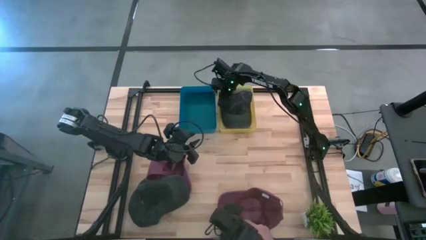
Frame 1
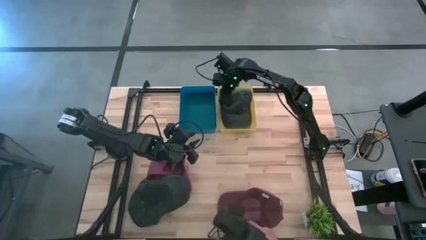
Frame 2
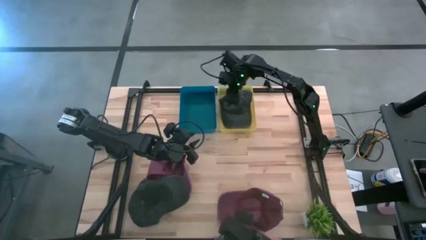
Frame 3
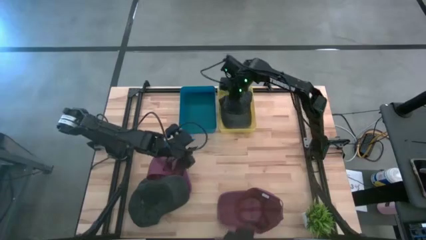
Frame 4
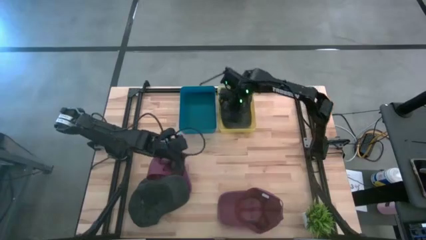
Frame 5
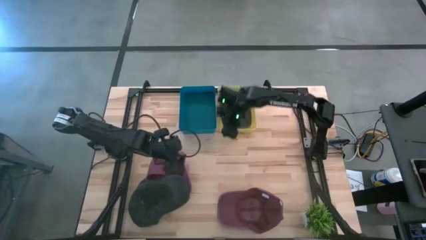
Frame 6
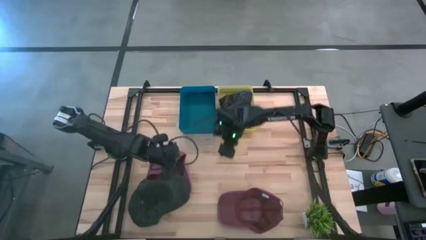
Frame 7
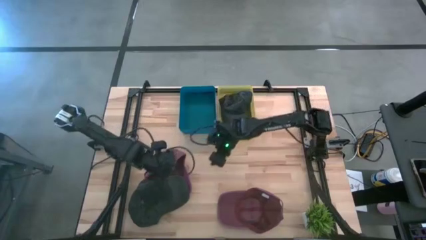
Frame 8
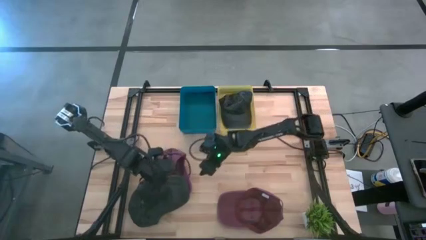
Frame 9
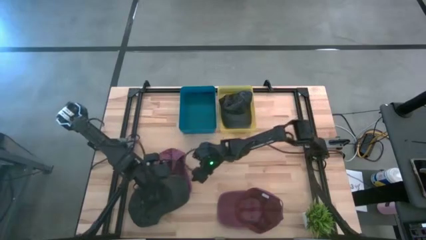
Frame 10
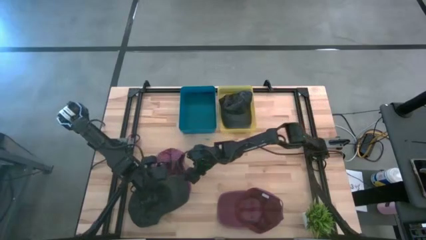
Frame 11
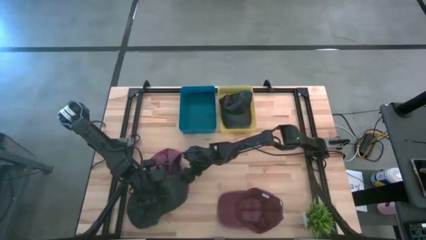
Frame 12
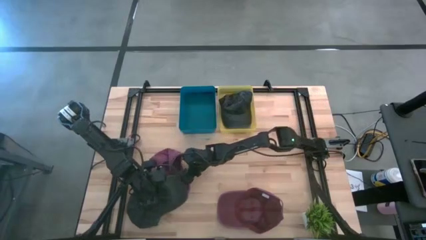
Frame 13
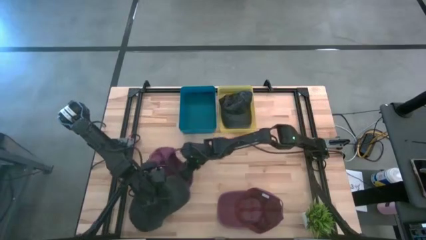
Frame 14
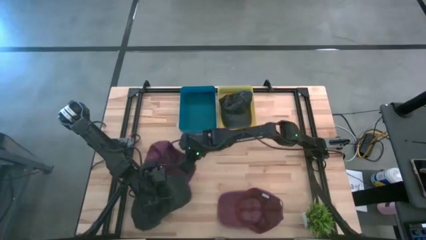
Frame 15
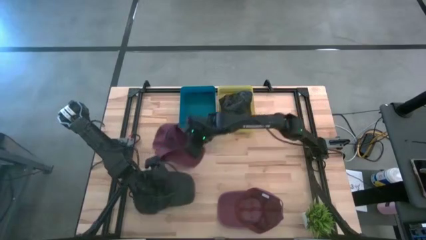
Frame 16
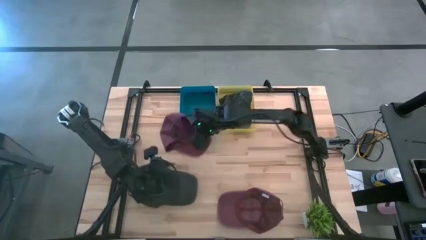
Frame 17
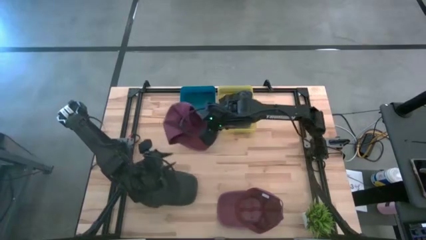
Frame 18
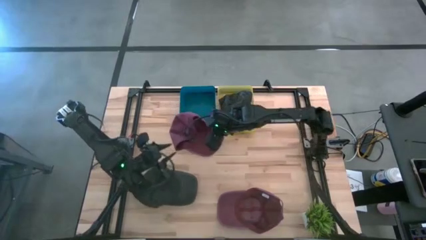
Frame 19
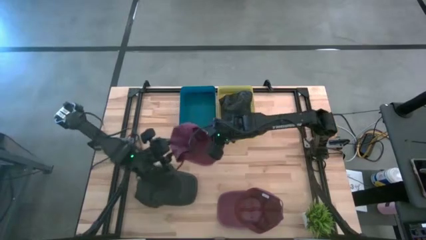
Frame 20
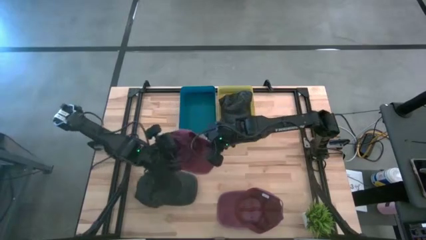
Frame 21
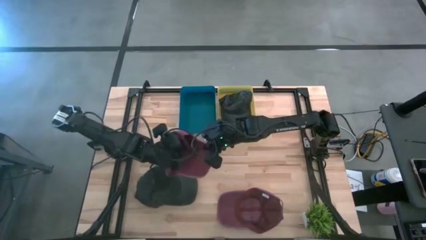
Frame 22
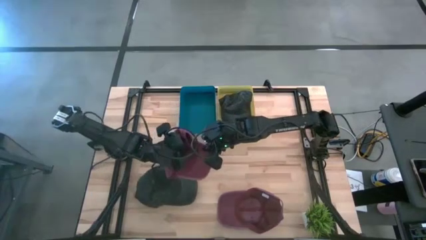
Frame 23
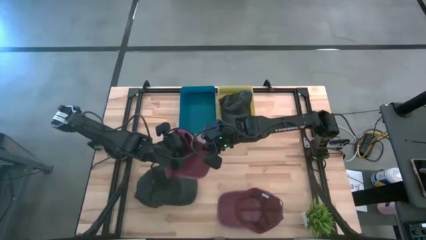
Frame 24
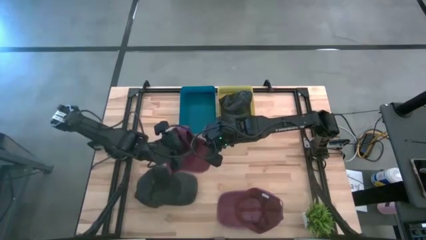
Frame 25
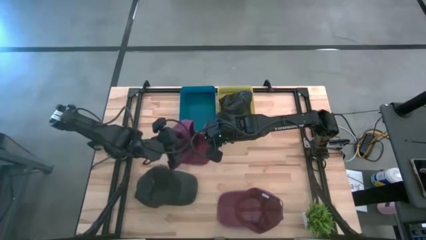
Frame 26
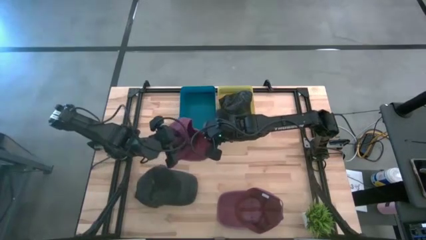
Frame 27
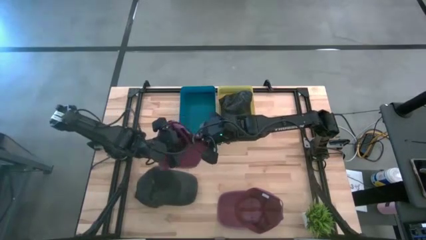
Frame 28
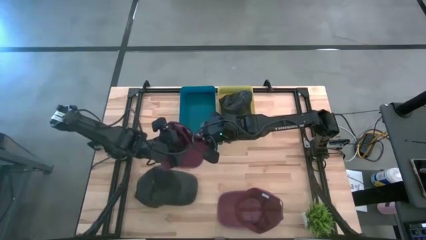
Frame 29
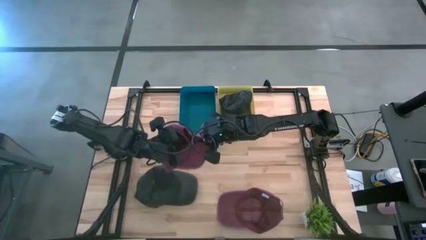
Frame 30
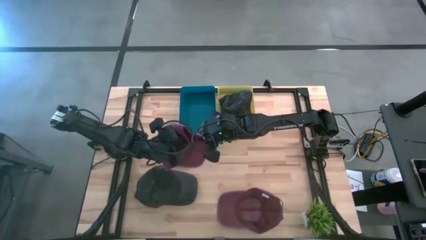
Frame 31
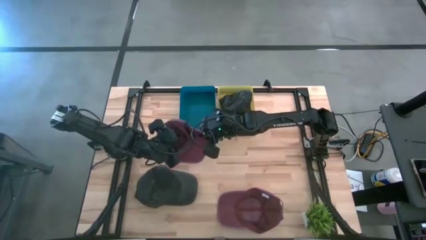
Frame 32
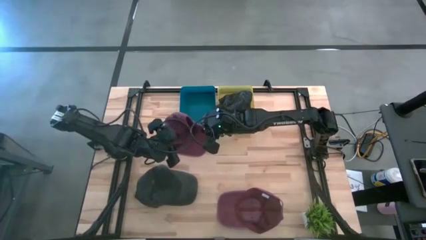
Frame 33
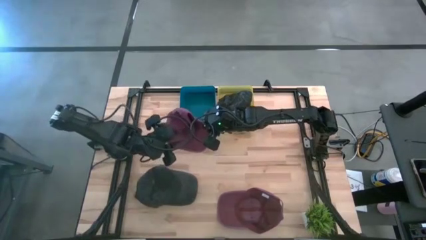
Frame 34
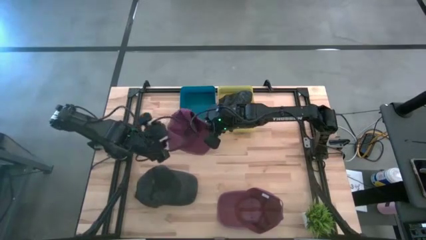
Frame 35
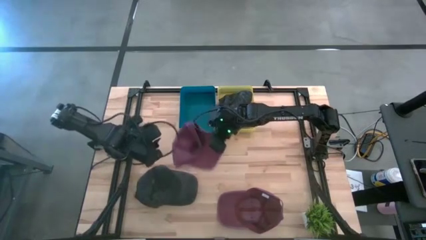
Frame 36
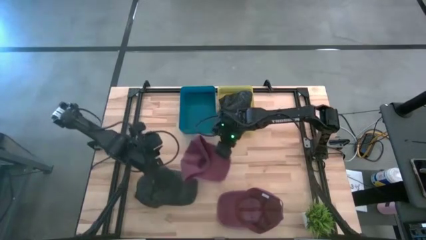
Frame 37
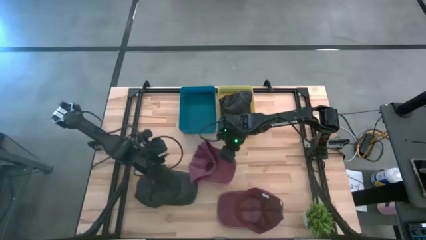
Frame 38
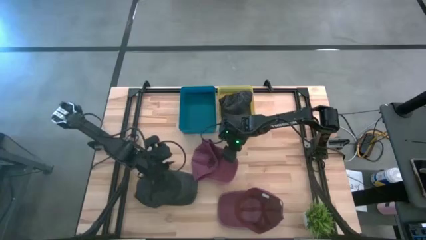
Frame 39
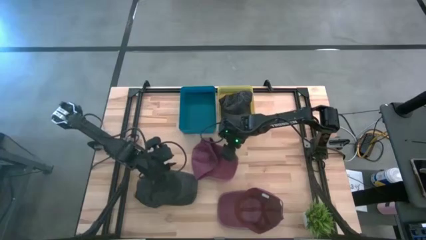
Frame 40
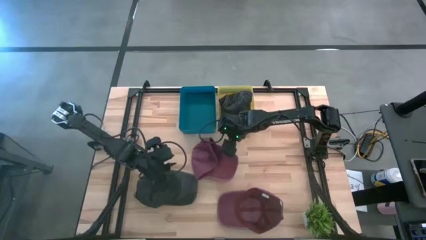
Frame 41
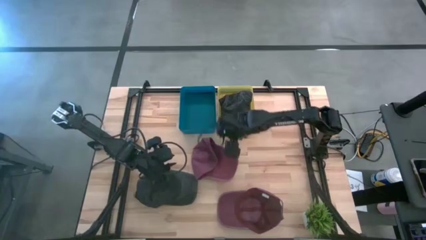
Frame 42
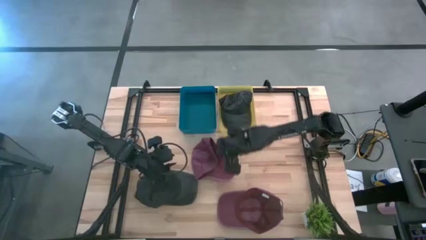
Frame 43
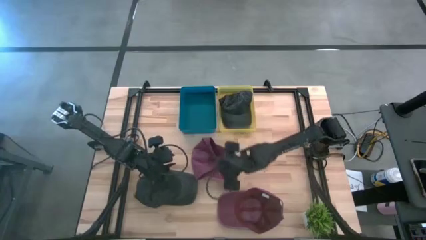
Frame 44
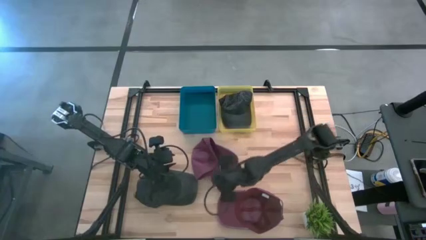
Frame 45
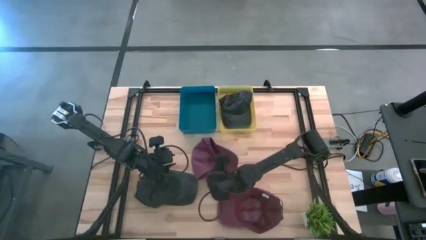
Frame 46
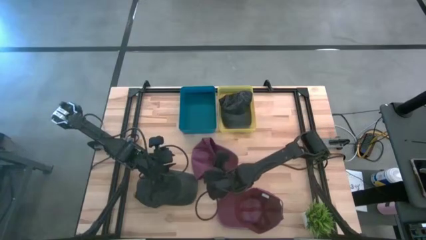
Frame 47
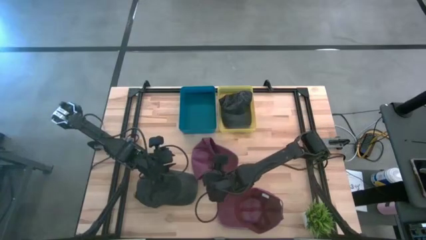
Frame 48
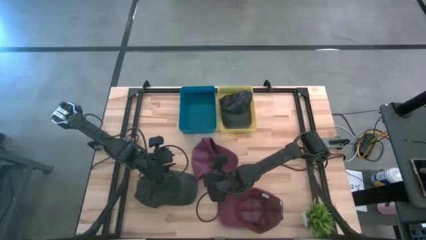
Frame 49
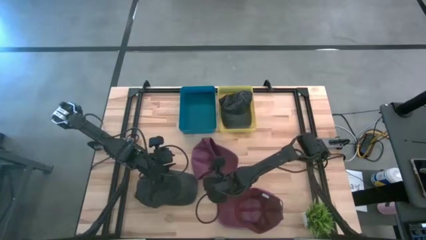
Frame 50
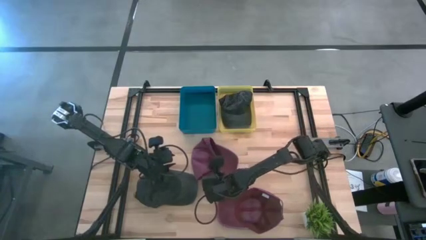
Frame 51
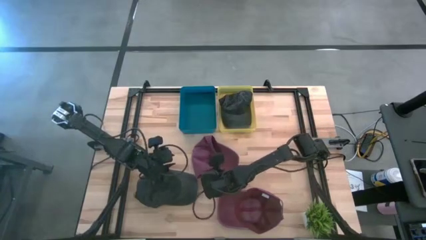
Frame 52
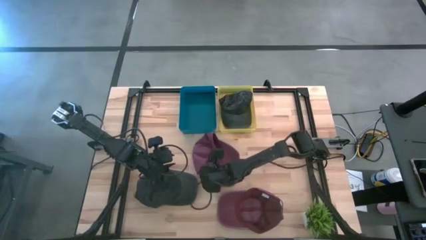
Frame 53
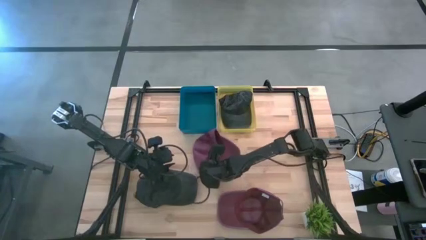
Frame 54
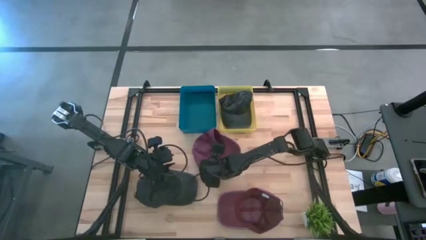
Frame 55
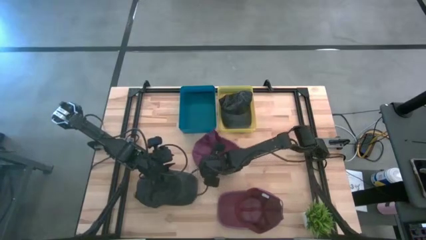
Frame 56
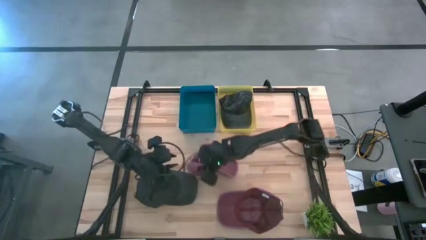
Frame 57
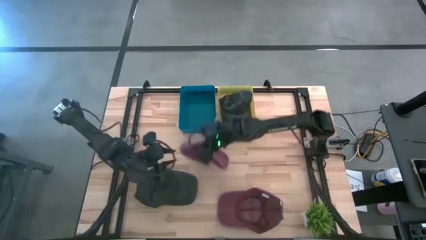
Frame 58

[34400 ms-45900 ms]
Task: Pick & Place hat
Put the red cap into the blue bin

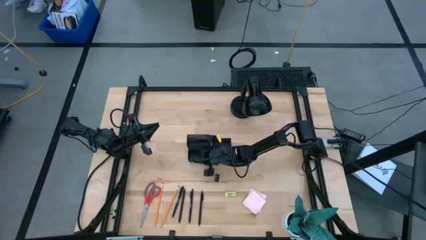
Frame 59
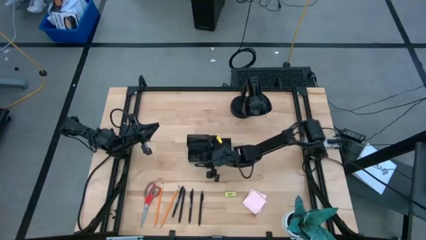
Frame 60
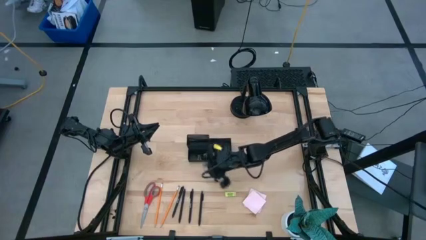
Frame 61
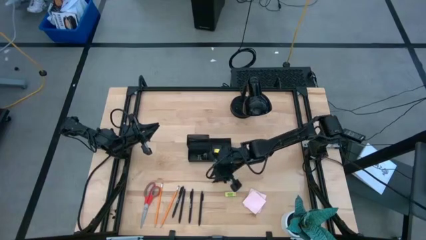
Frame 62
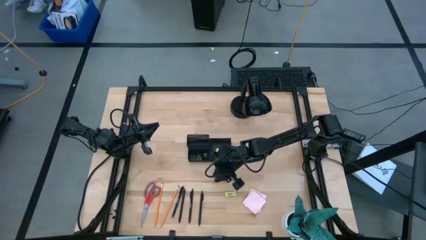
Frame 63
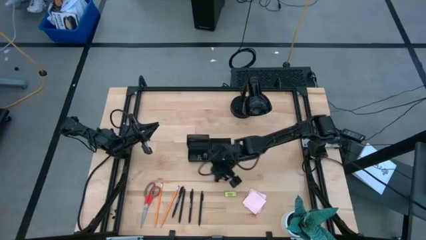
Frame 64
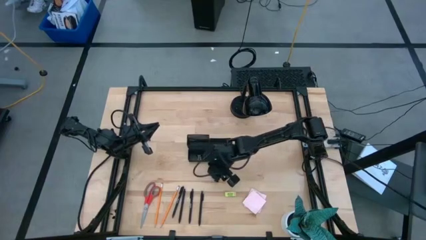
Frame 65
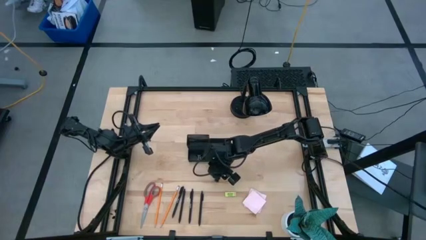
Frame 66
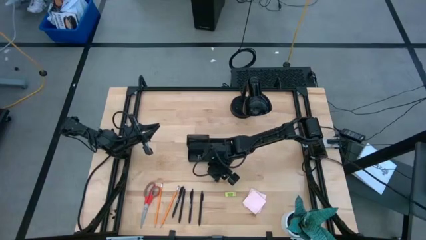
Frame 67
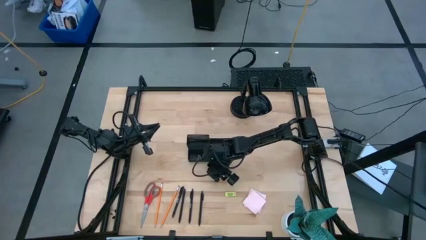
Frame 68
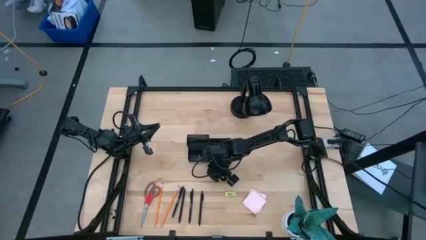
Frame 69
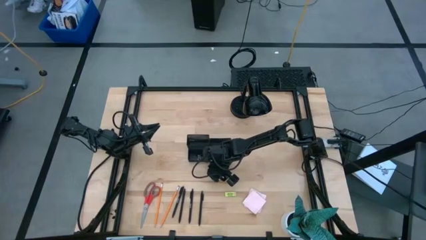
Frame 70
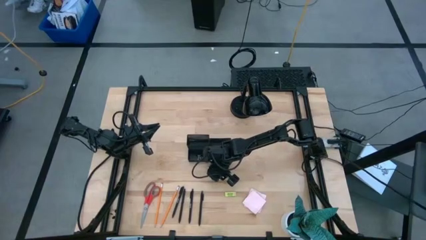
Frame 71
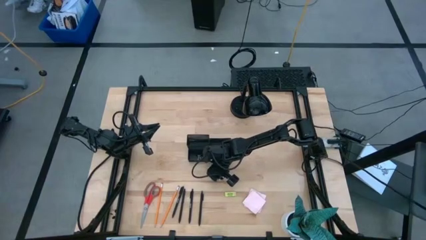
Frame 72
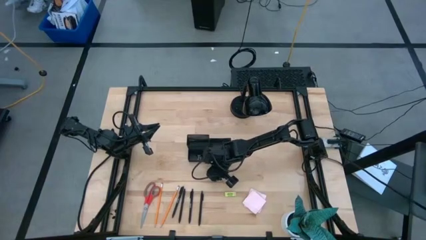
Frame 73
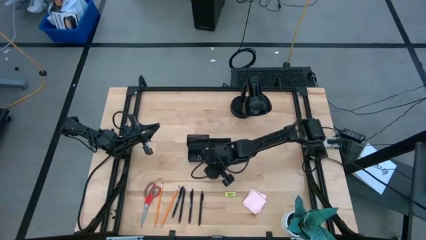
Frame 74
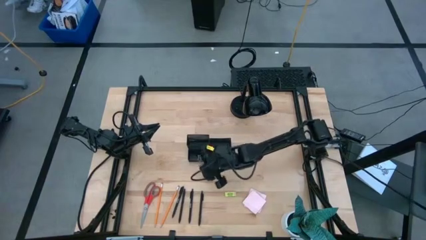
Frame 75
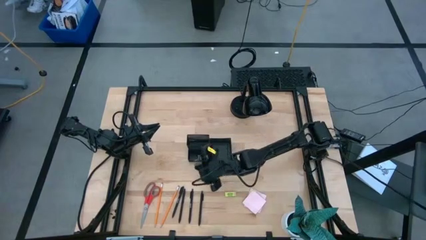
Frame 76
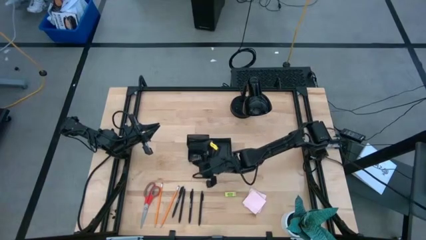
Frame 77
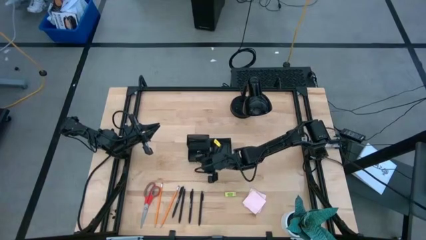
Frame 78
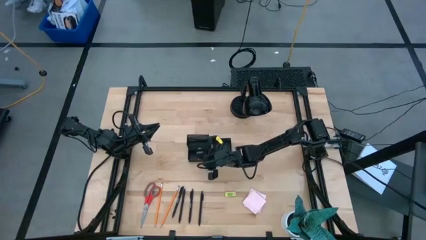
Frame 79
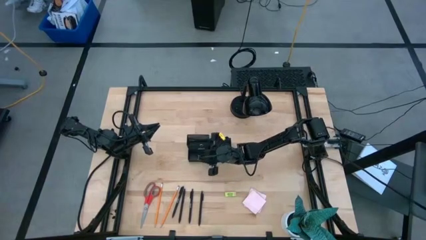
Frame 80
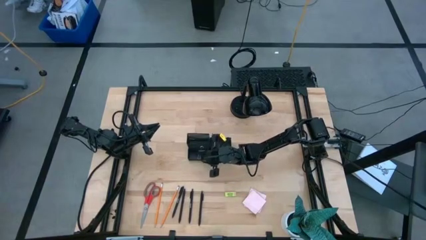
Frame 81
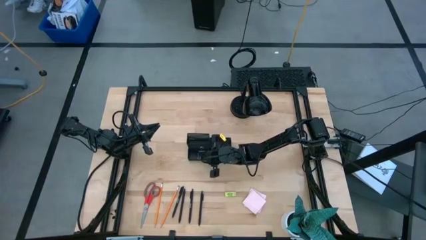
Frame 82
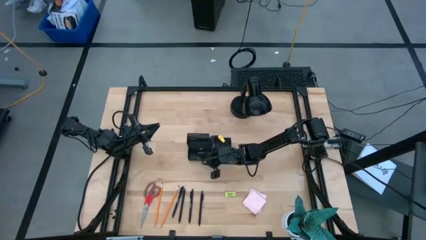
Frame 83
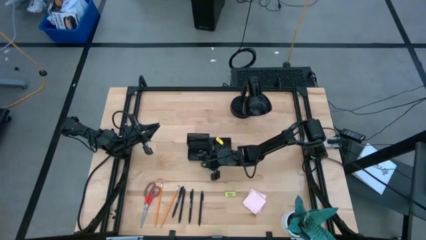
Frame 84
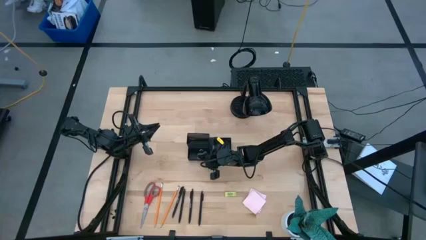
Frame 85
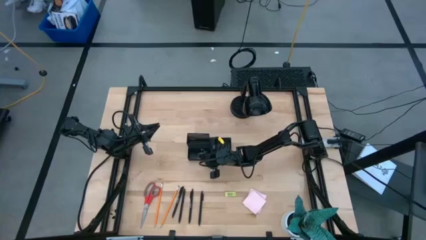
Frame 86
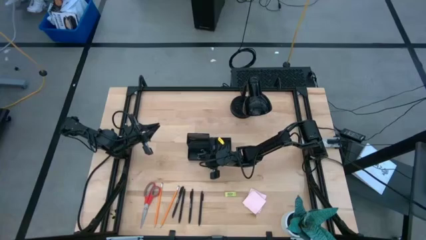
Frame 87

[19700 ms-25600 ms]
Task: Pick and place office supplies into organizer
Put the black binder clip into the black desk organizer
